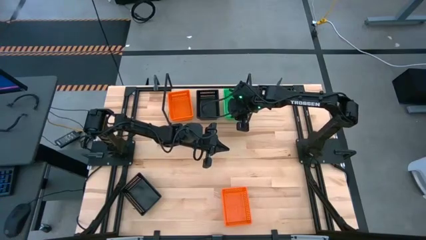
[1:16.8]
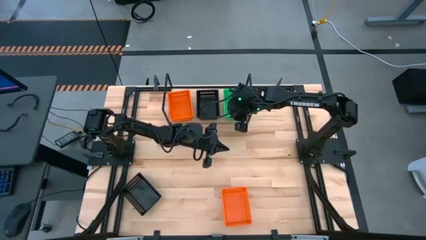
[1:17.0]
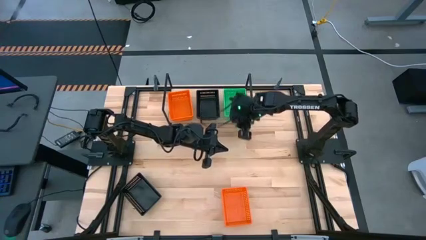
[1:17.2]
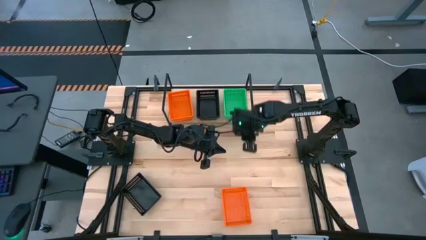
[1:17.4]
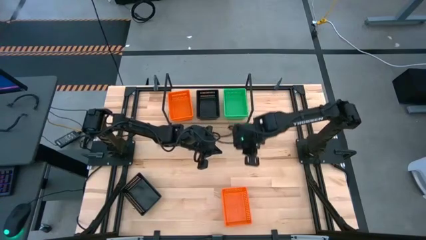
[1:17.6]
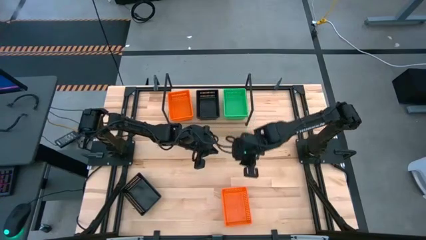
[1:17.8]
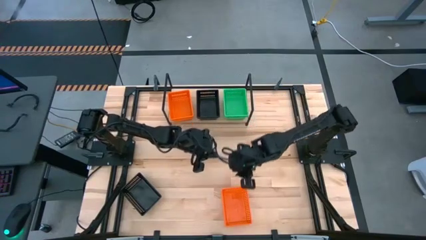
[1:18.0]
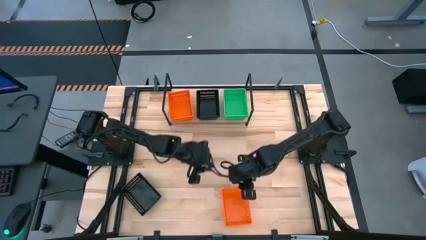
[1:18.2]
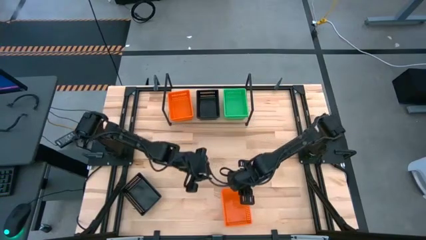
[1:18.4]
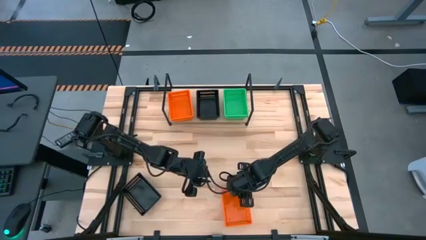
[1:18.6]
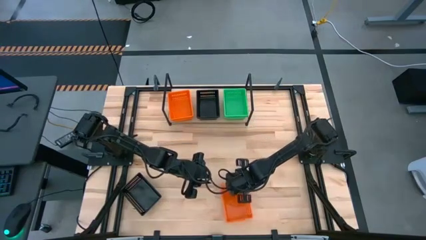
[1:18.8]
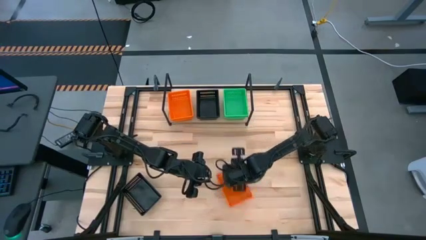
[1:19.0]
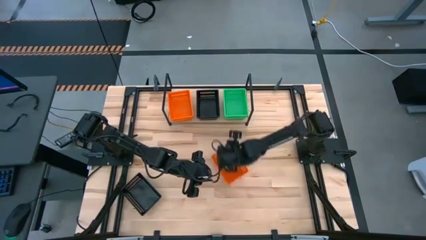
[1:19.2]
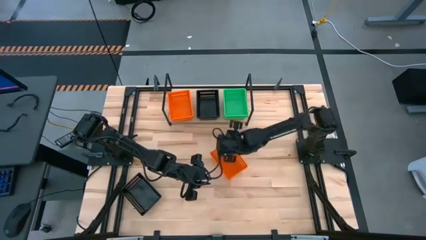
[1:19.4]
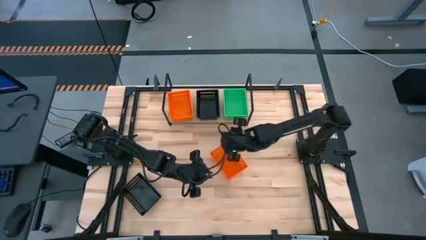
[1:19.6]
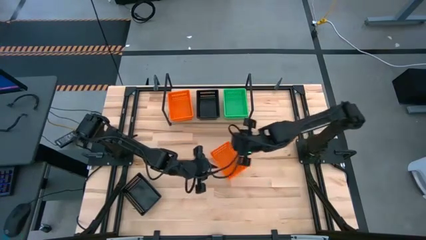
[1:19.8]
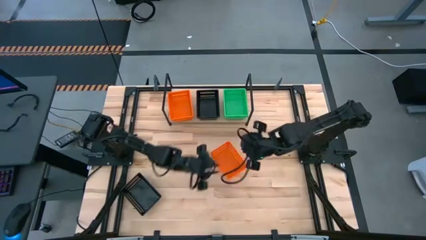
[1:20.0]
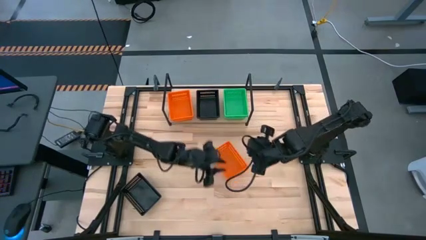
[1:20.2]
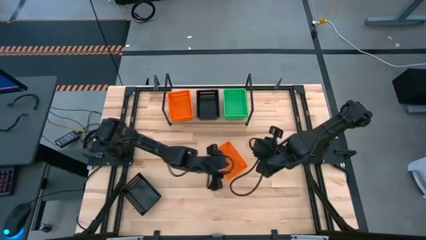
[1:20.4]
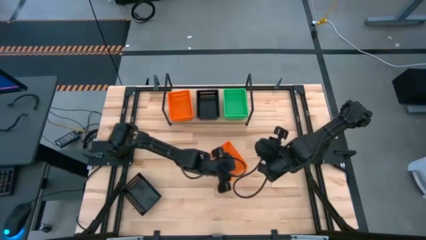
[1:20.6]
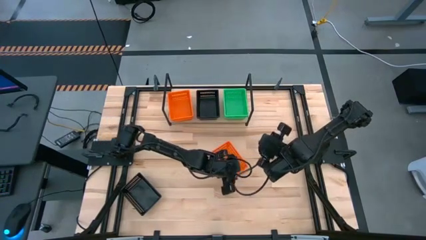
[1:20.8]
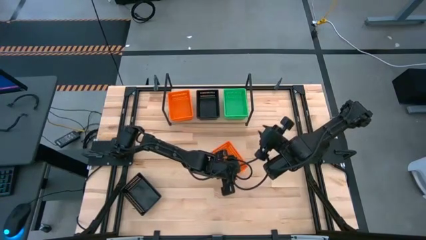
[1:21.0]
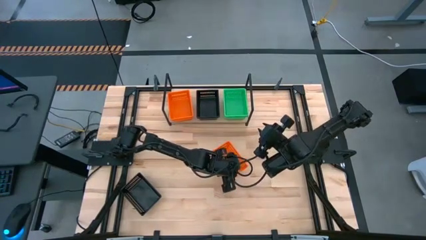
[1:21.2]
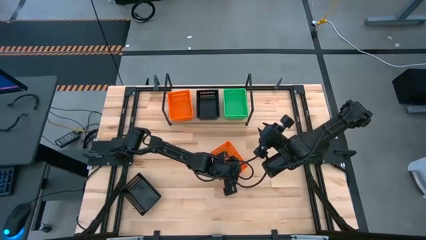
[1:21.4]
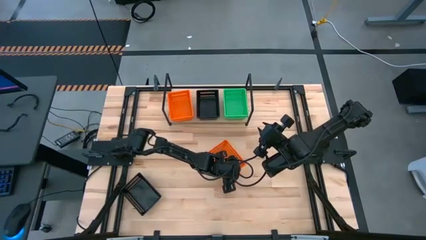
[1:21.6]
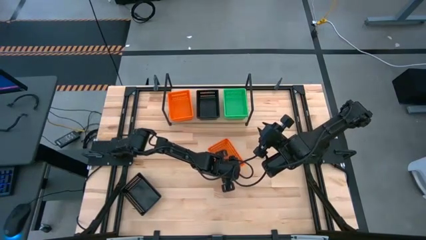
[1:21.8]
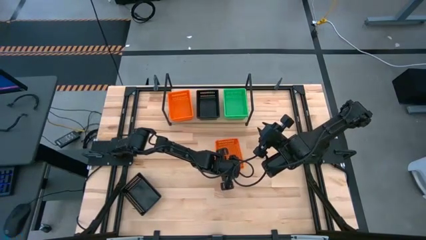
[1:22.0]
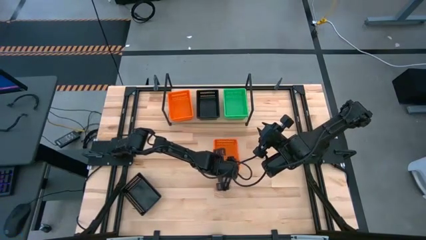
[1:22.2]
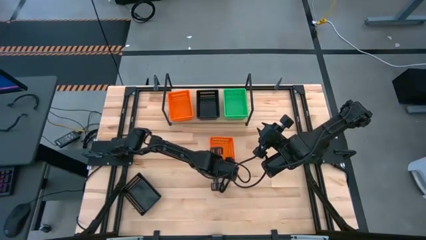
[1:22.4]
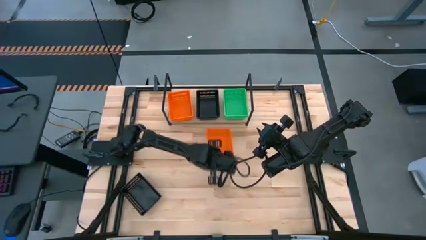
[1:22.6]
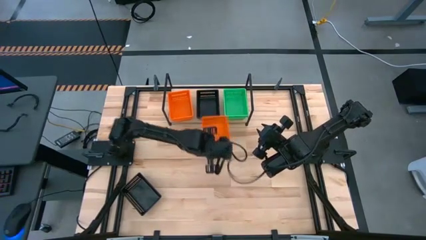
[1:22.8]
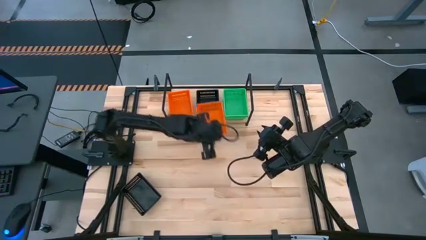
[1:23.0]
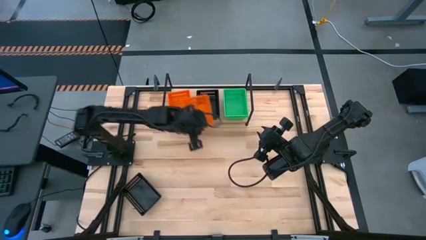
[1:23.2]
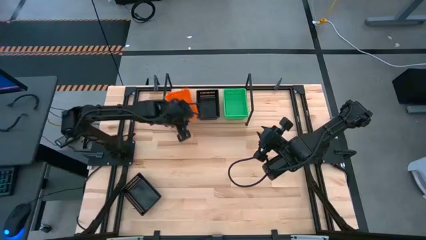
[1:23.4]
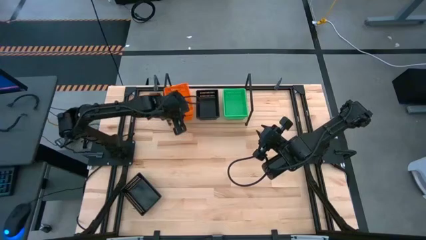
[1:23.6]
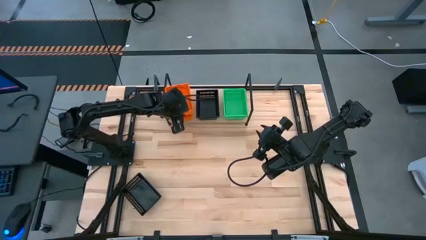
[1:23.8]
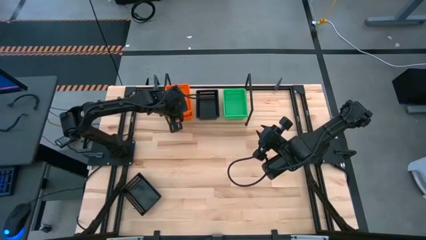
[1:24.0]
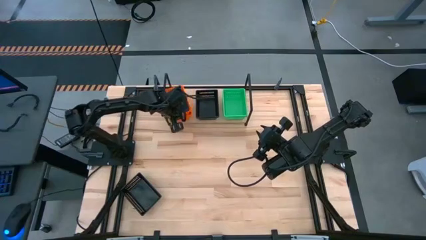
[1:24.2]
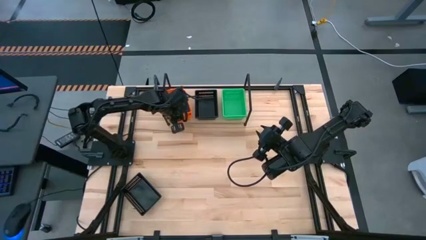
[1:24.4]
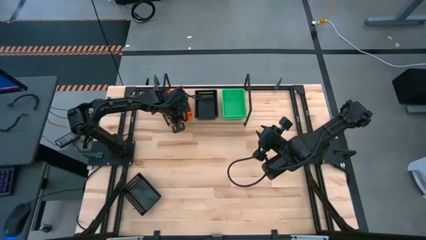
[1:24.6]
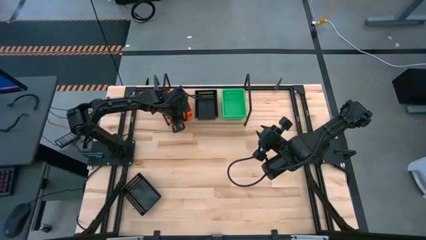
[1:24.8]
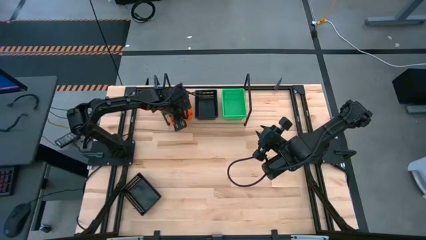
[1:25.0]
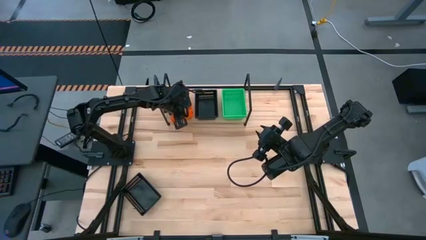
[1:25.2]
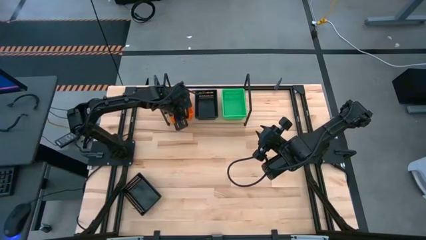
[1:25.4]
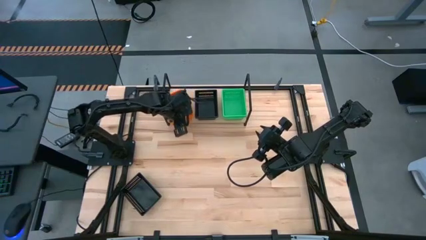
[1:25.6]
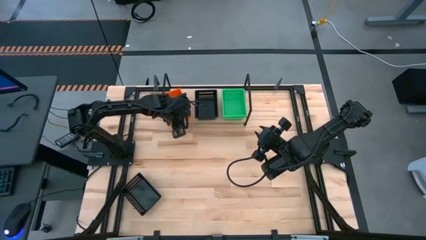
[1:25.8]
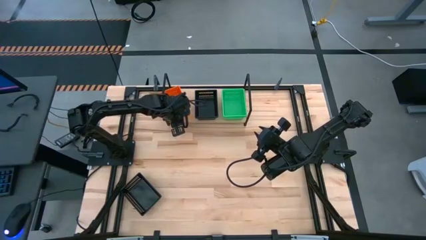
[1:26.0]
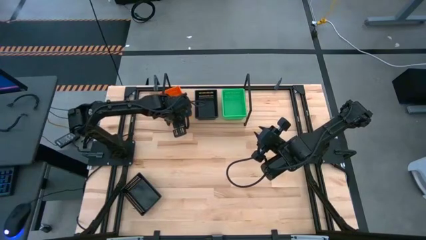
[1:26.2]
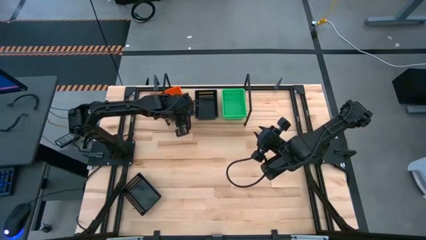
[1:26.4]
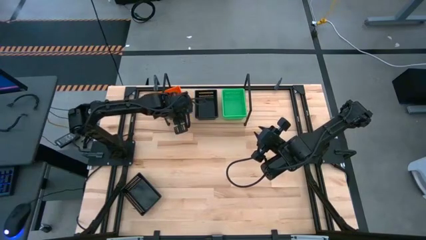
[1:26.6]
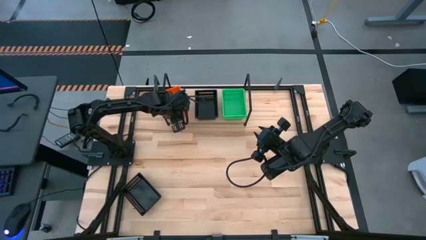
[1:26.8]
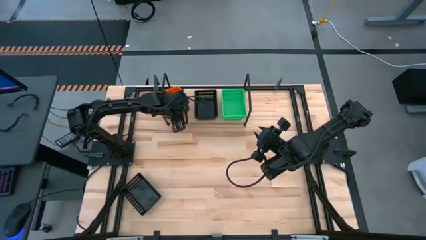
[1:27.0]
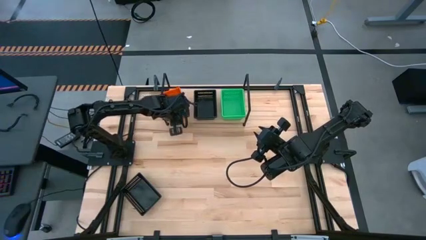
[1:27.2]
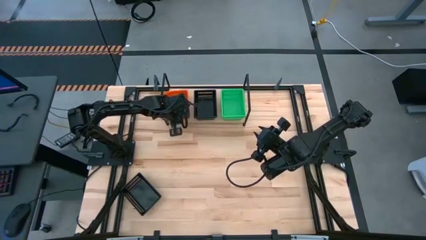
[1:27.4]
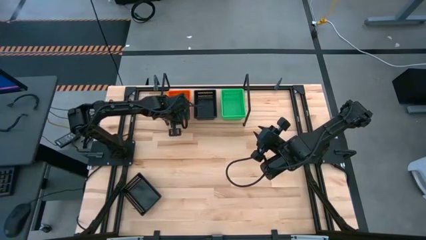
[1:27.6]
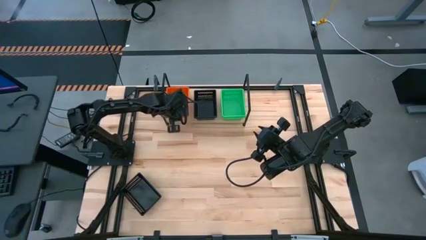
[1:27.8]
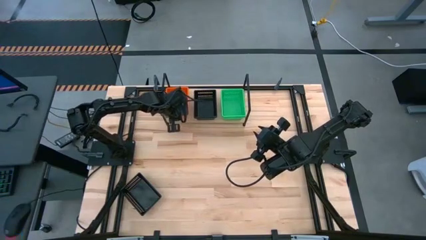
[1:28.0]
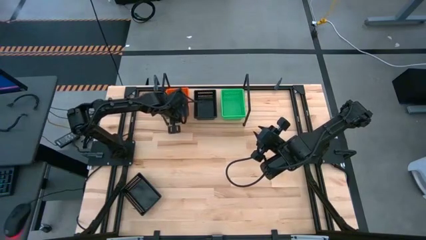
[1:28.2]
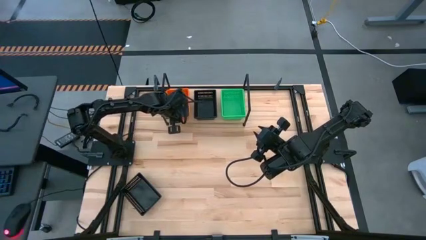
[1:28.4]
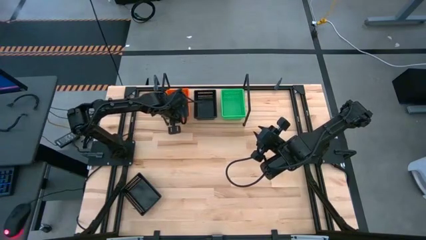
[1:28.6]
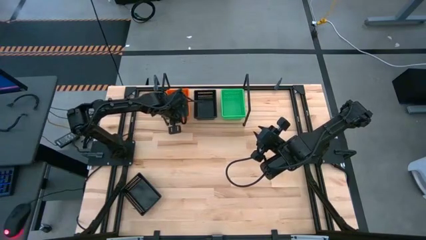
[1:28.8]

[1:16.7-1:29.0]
Task: Stack baskets on shelf by color
Stack the orange bin on top of the orange bin on the shelf

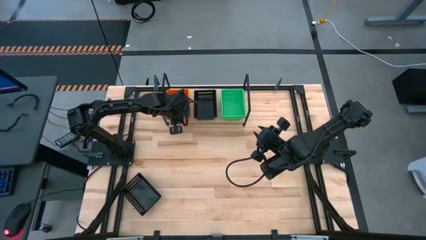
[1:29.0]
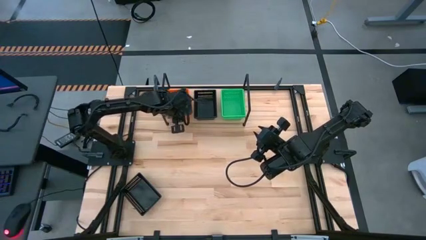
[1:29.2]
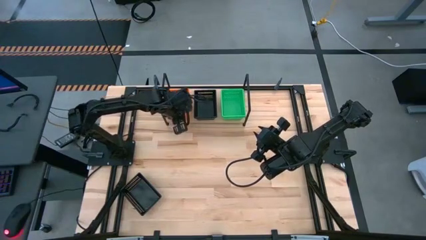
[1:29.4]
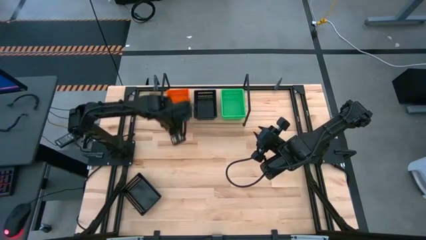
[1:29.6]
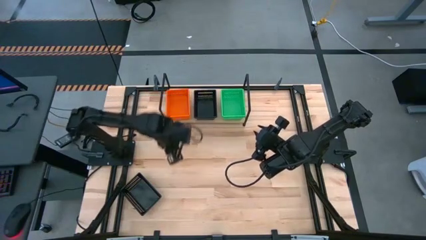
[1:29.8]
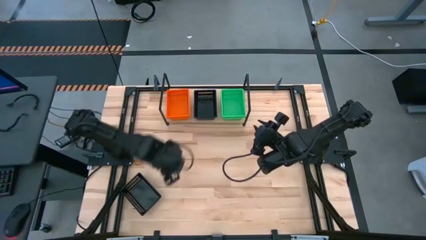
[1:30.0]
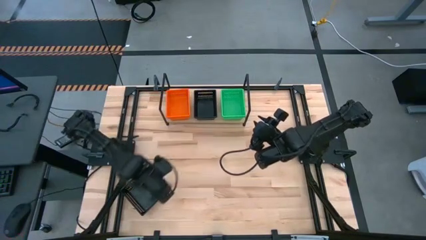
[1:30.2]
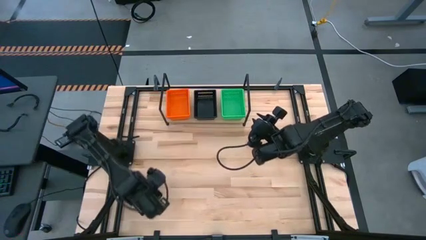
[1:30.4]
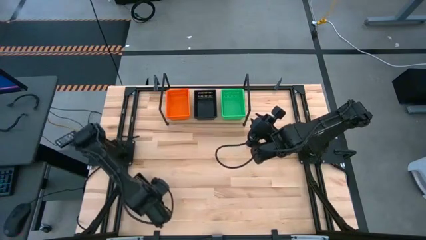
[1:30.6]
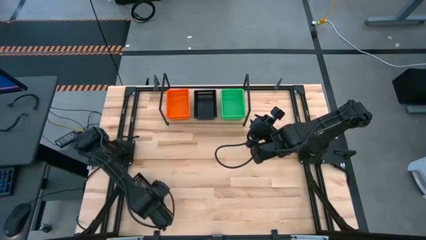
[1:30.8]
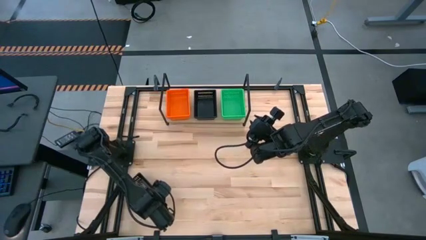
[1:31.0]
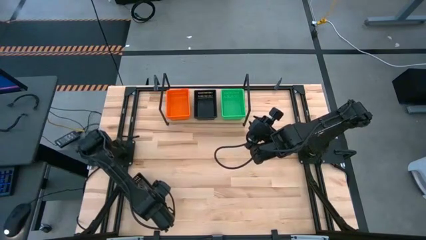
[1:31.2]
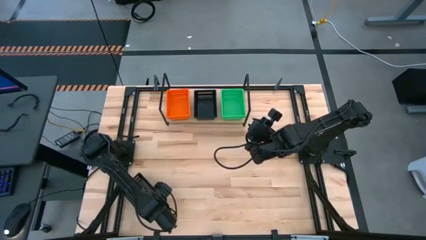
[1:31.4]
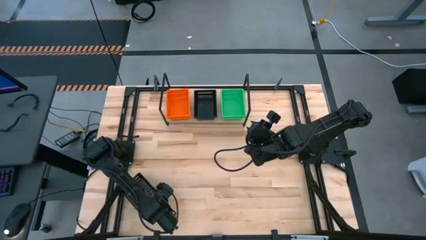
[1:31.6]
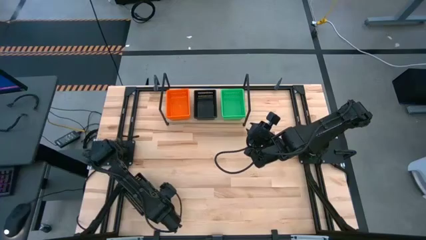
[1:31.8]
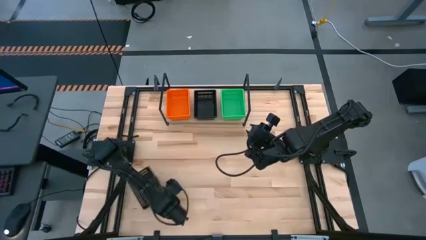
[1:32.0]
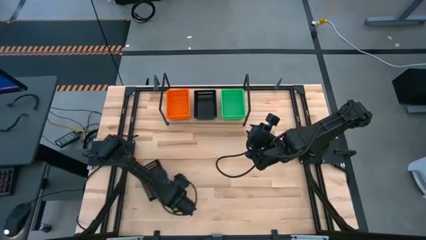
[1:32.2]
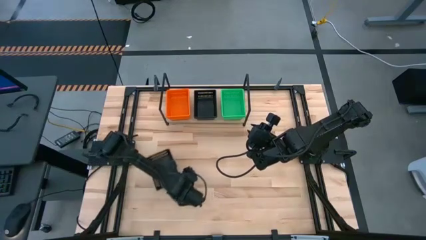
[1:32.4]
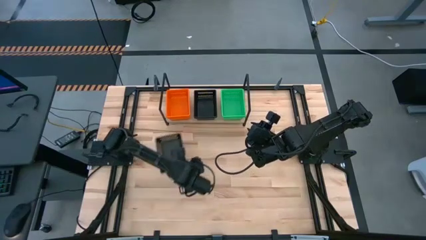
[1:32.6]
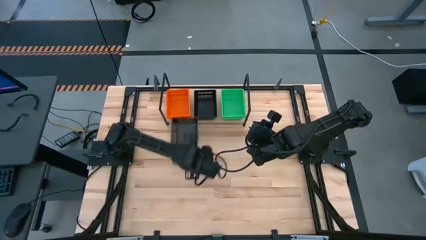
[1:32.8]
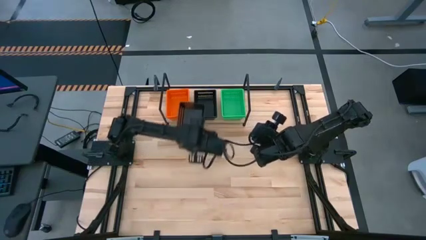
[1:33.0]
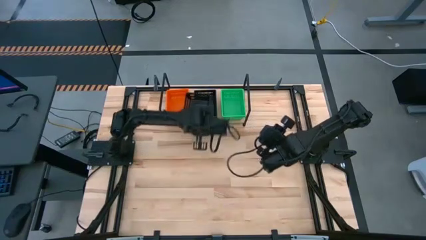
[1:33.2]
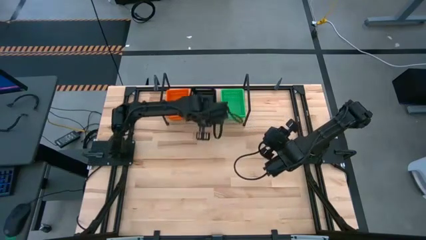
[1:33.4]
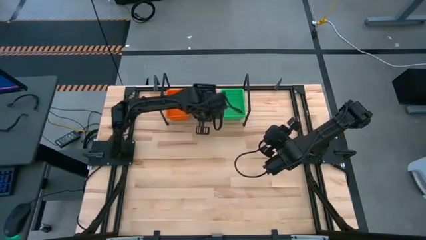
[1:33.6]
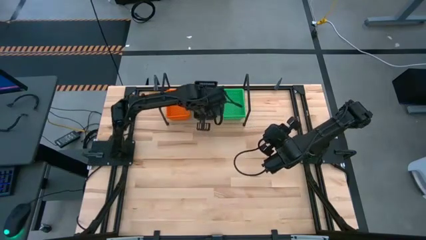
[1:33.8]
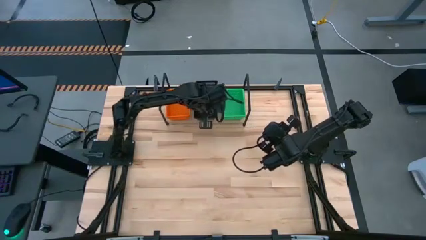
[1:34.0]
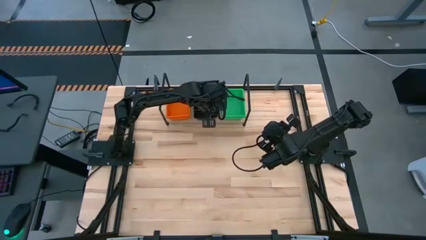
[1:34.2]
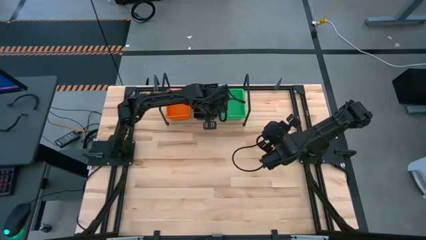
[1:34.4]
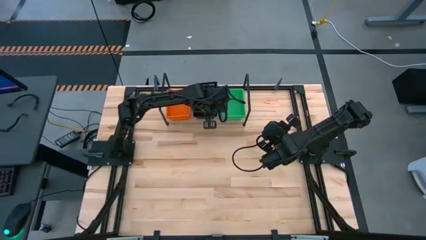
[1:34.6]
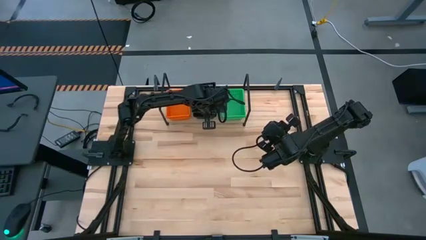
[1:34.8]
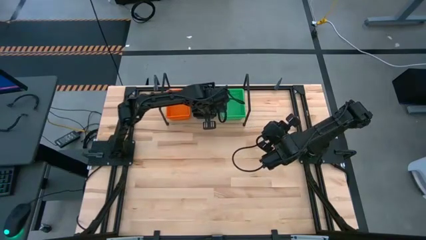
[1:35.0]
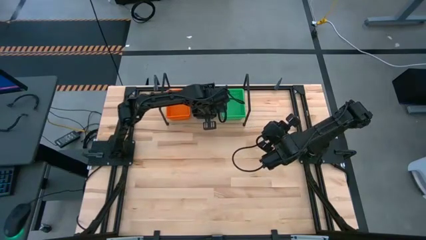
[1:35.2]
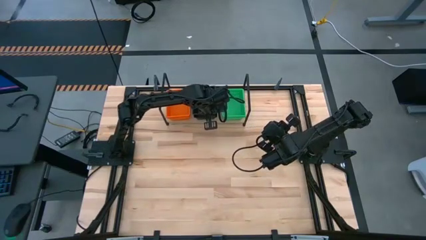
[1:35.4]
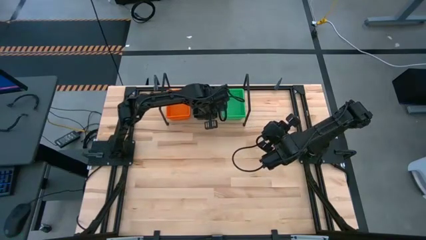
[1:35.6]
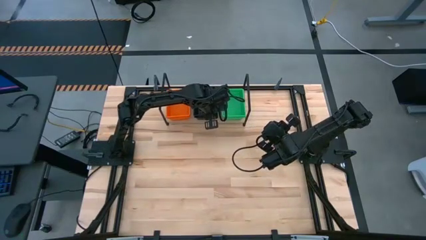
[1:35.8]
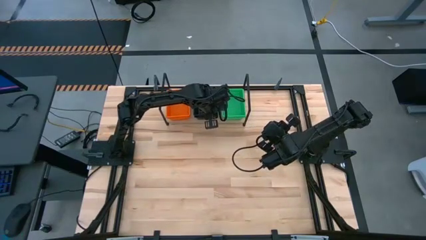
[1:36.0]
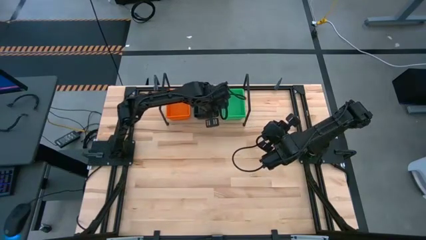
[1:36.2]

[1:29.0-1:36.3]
Stack the black bin on top of the black bin on the shelf
